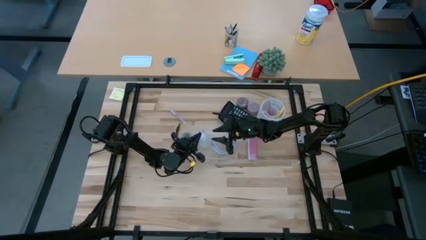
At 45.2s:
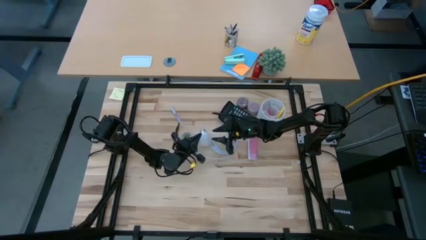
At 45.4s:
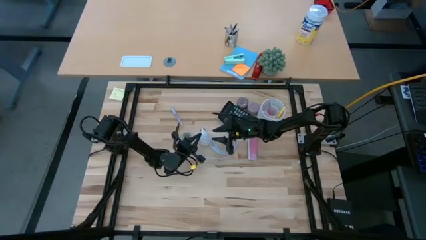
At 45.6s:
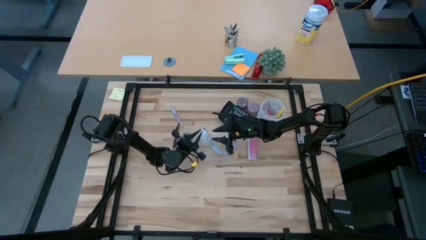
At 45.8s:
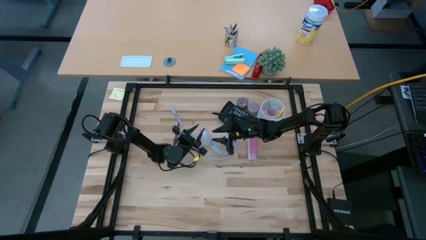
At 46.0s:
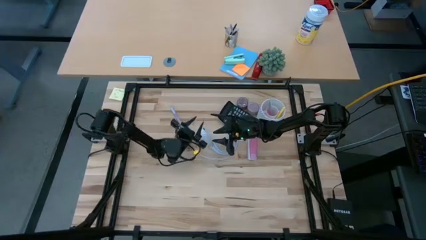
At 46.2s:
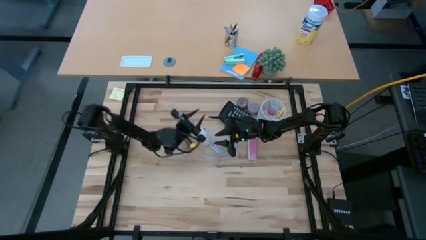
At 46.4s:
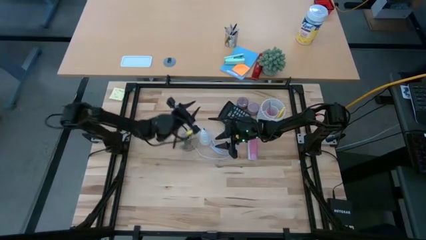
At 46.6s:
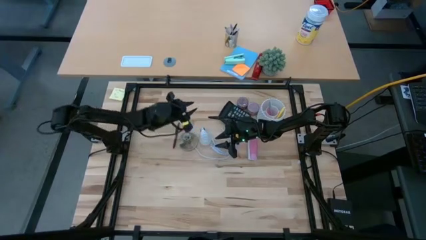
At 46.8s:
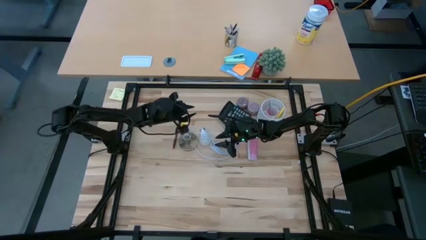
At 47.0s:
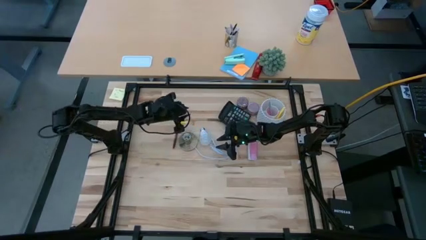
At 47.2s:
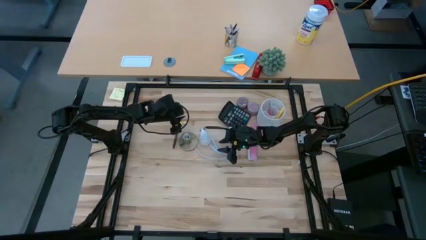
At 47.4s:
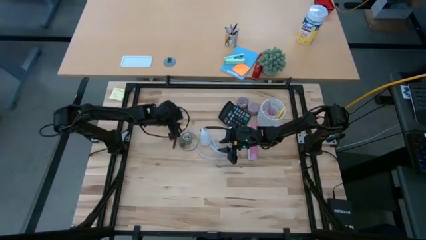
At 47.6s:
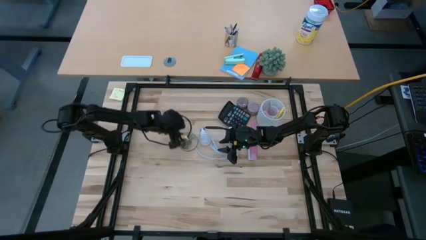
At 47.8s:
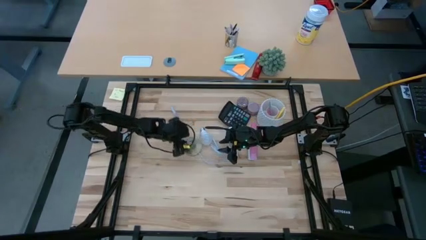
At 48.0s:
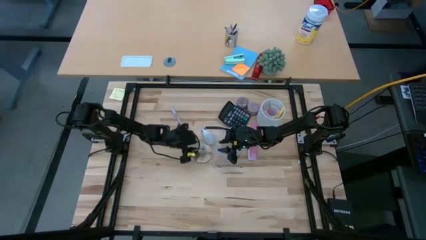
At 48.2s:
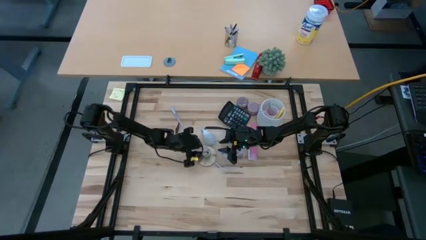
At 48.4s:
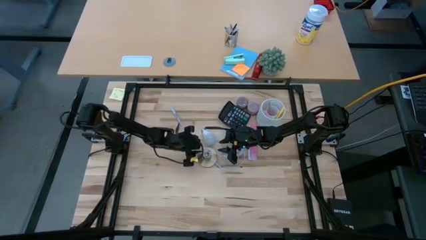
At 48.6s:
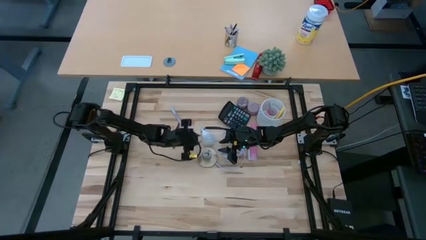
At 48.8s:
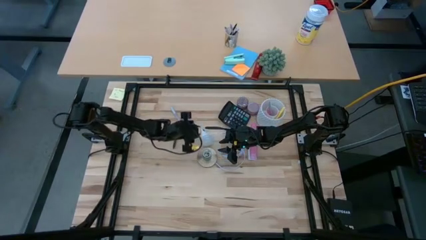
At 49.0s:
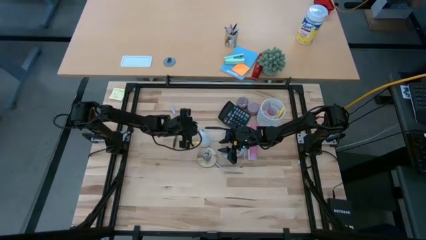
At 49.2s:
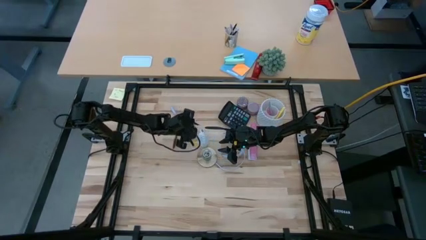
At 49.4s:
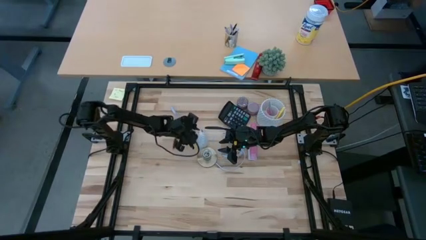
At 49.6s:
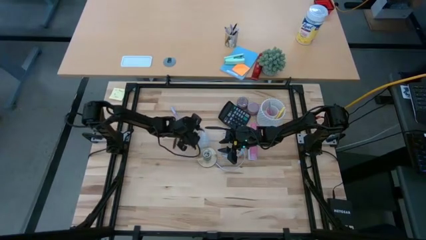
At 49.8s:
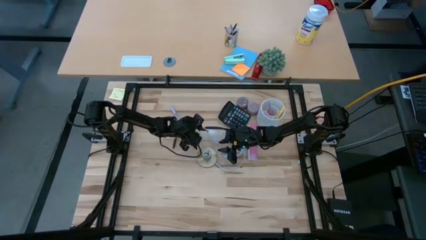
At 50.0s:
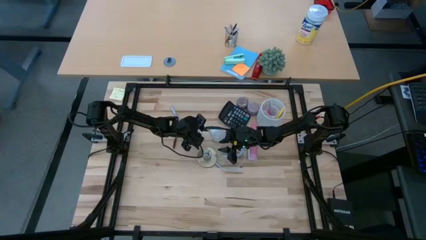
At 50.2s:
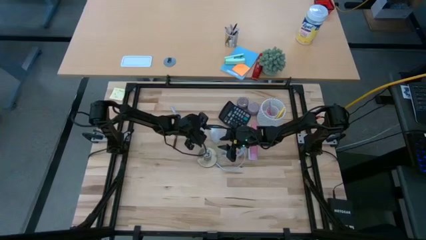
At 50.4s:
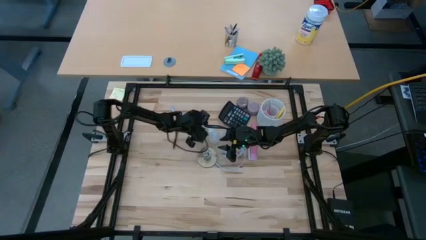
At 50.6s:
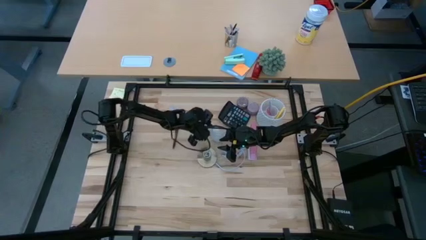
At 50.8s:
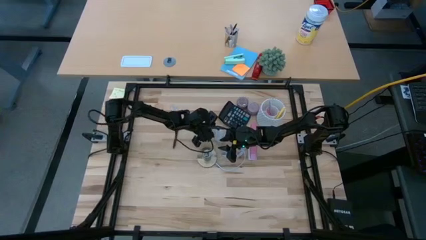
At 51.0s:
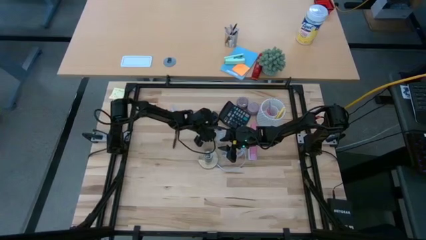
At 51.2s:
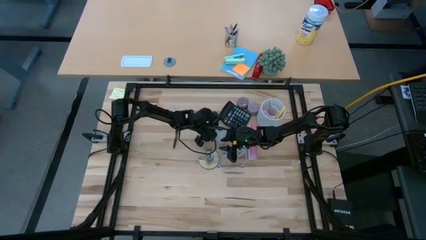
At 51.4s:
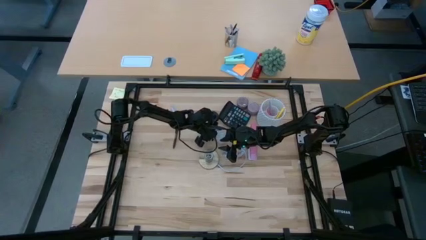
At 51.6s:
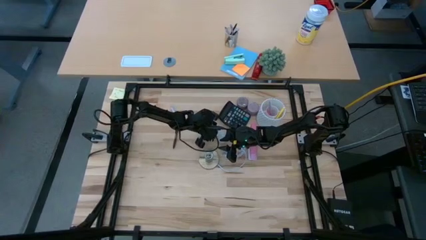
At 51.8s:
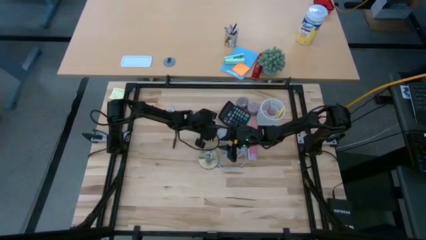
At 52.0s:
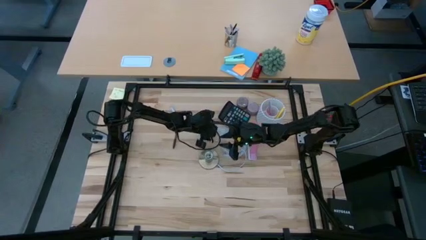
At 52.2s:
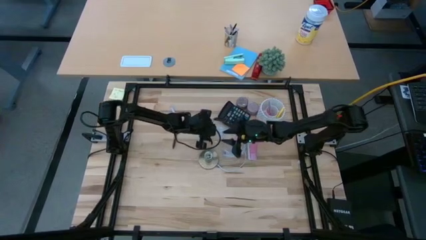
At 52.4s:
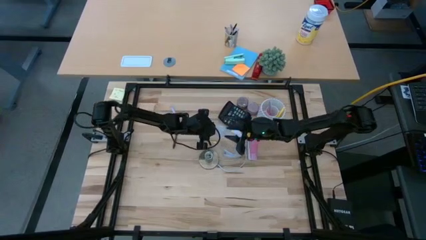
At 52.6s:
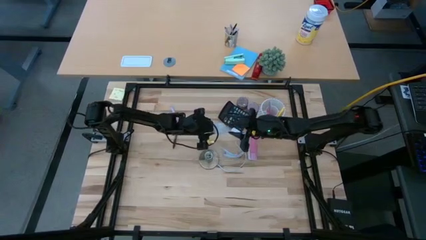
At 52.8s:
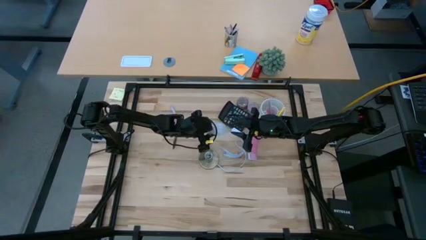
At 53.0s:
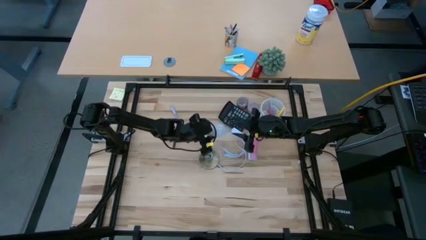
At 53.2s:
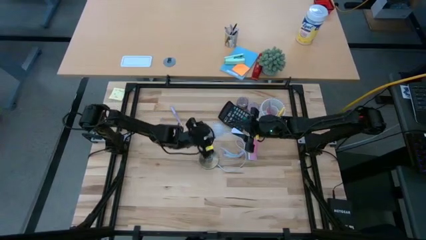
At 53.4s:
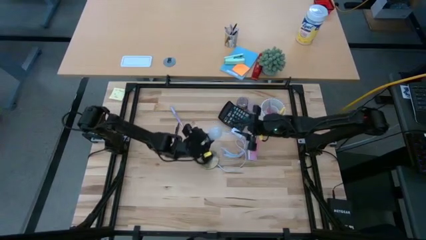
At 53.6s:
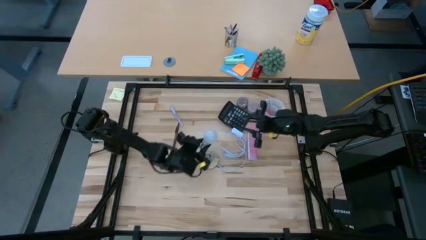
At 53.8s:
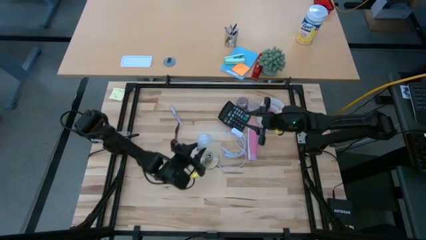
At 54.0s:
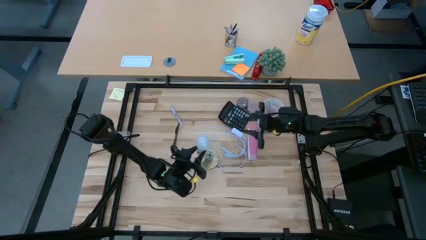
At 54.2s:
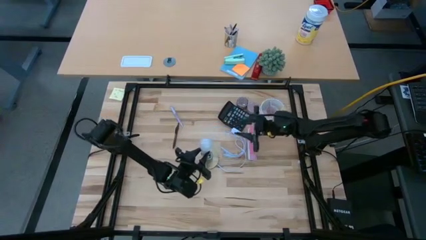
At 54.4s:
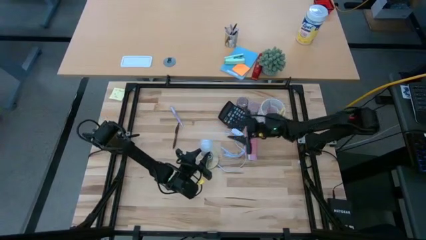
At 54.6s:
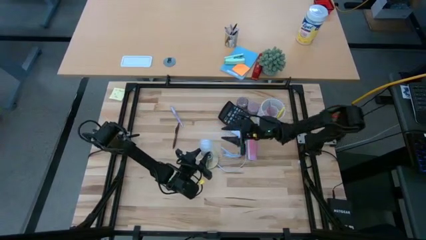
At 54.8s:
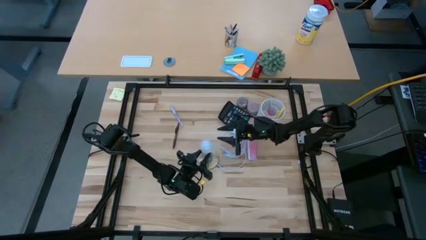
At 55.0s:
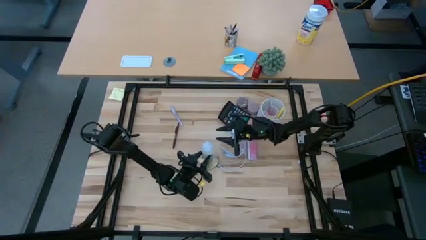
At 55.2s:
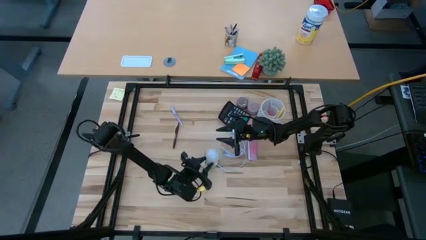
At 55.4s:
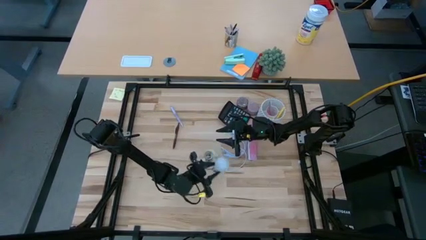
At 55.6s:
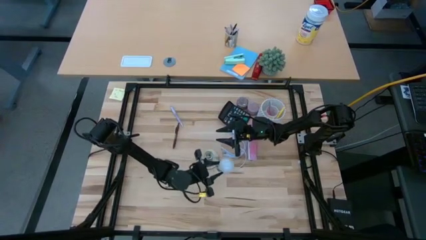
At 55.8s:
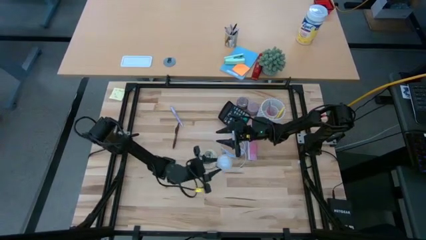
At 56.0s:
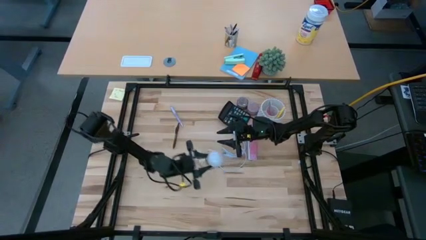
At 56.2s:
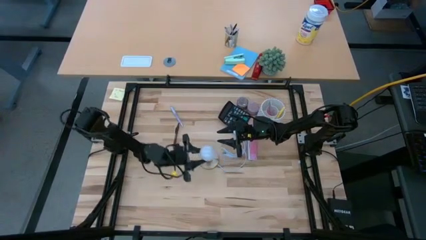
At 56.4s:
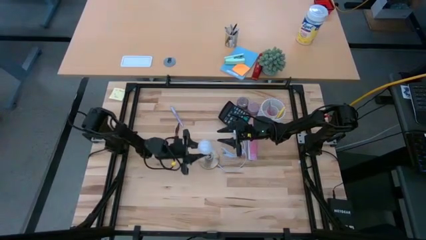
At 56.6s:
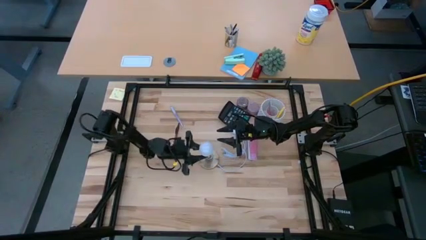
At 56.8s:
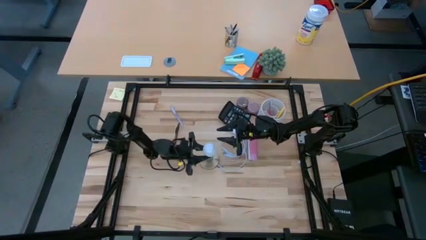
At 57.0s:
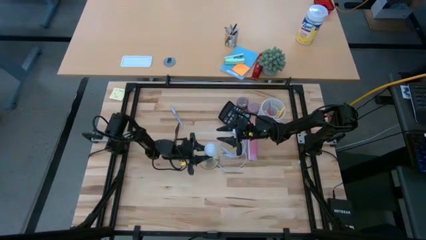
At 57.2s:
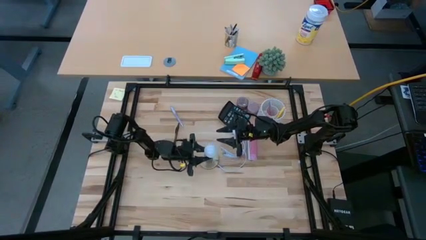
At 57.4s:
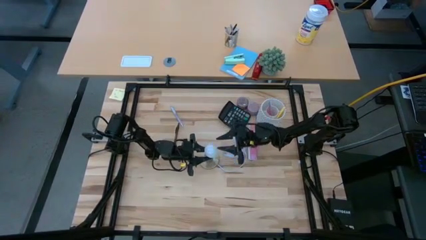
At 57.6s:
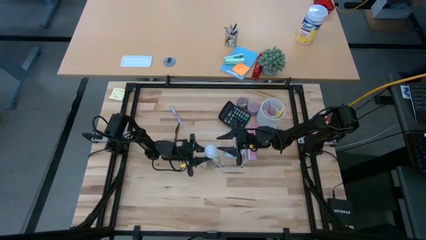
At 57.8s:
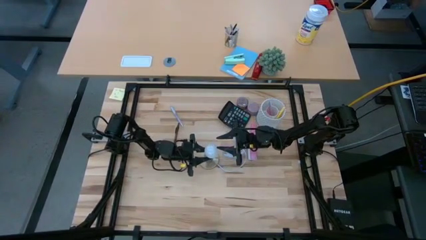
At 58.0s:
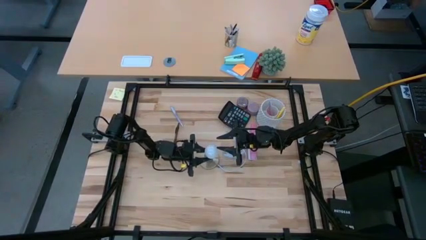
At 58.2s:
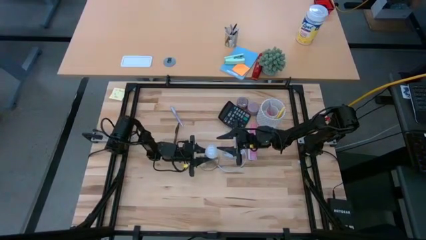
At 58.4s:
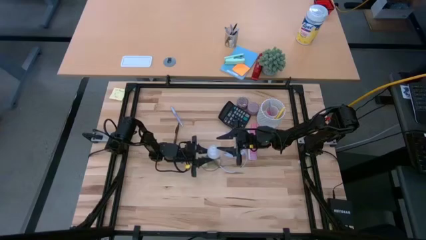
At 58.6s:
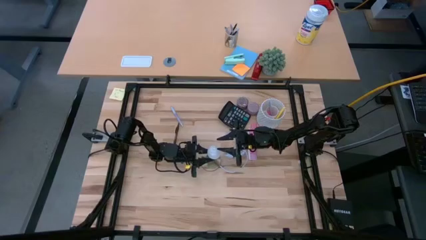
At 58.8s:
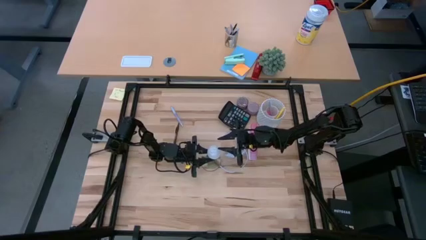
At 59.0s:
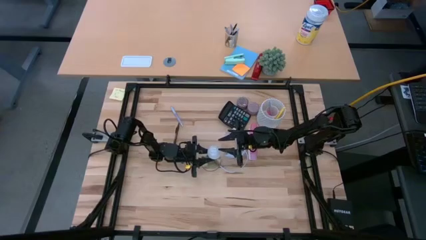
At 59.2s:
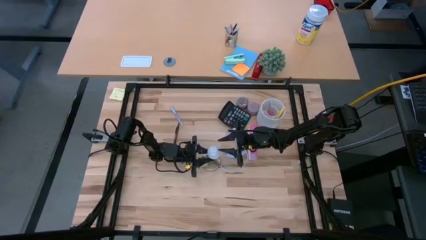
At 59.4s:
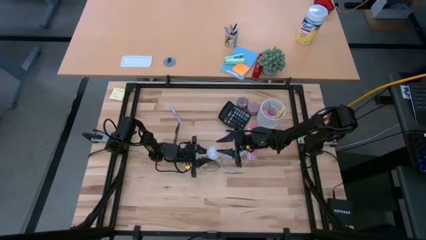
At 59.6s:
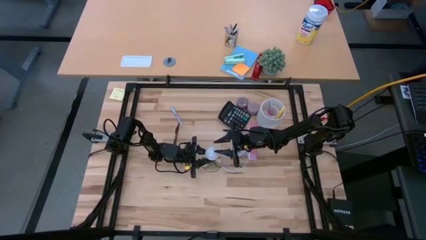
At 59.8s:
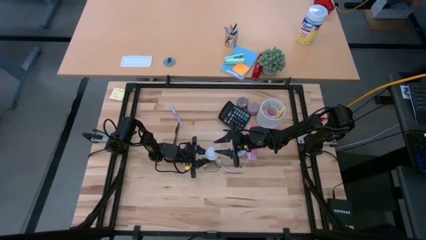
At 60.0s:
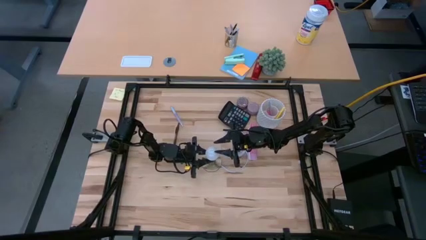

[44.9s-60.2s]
Task: Screw lightbulb
Insert the lightbulb into the gold lamp
